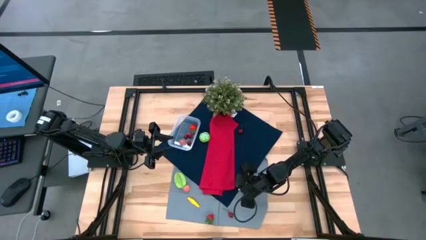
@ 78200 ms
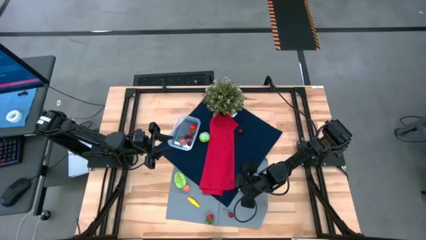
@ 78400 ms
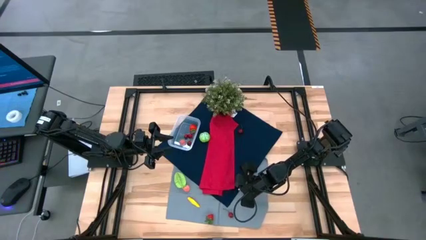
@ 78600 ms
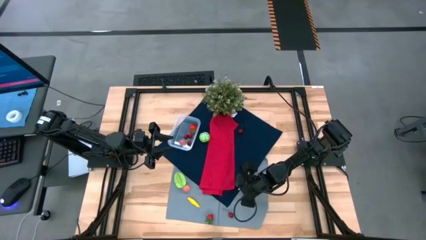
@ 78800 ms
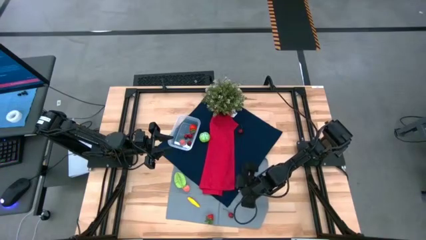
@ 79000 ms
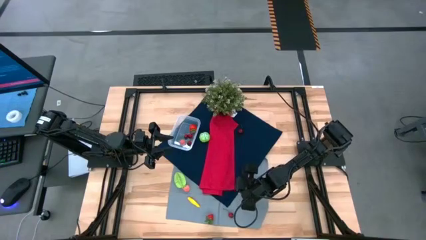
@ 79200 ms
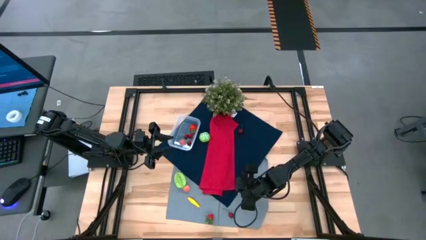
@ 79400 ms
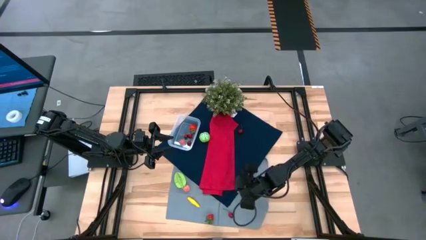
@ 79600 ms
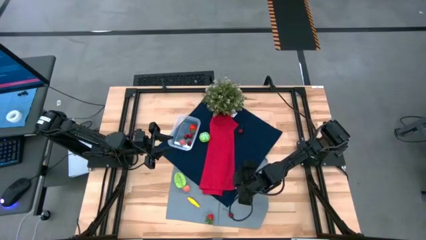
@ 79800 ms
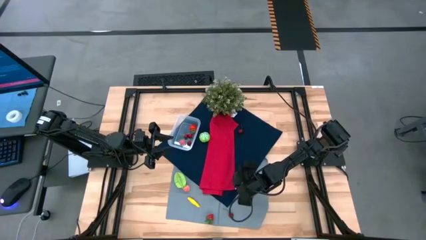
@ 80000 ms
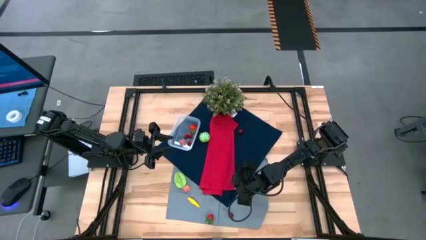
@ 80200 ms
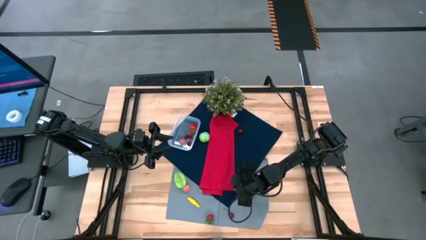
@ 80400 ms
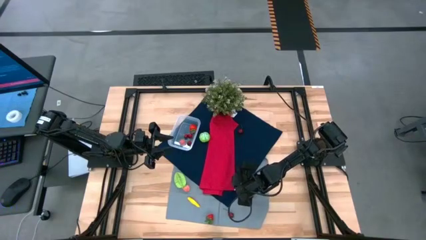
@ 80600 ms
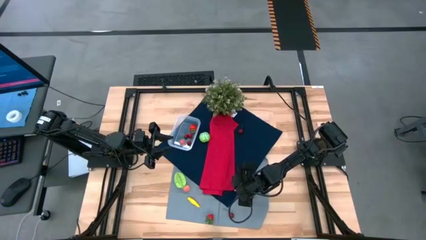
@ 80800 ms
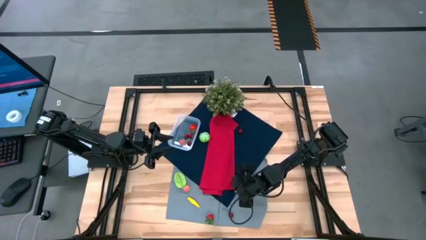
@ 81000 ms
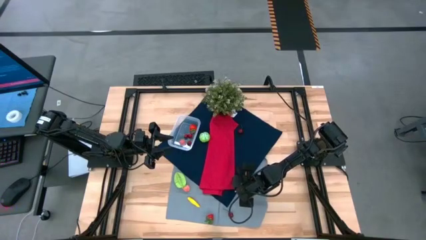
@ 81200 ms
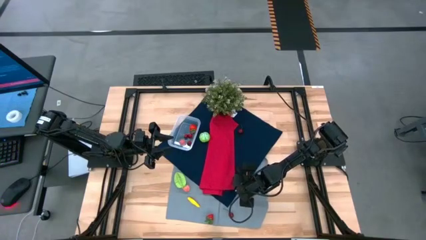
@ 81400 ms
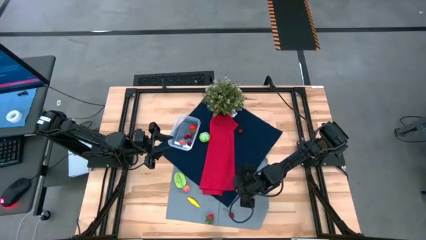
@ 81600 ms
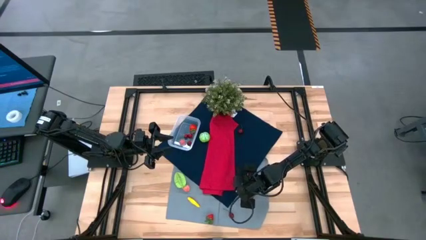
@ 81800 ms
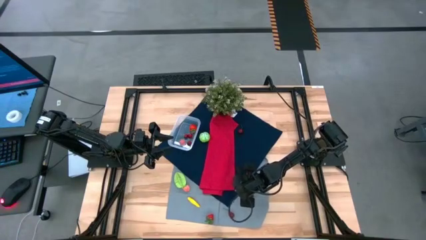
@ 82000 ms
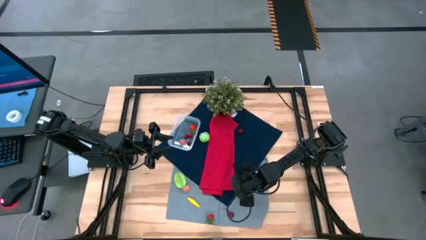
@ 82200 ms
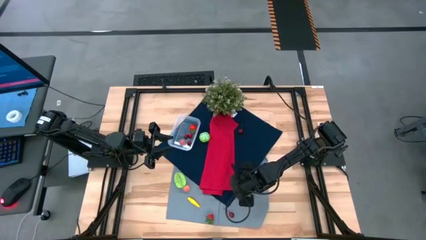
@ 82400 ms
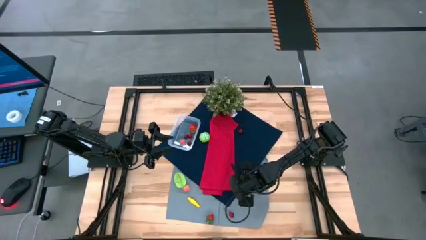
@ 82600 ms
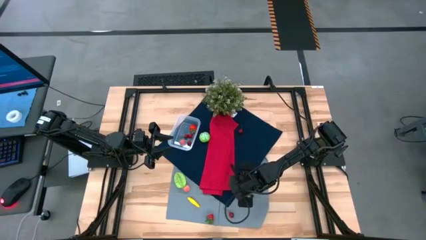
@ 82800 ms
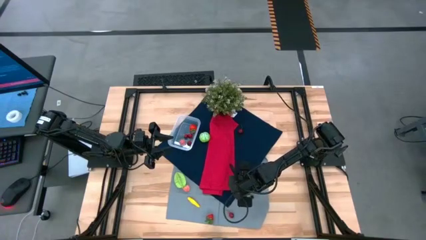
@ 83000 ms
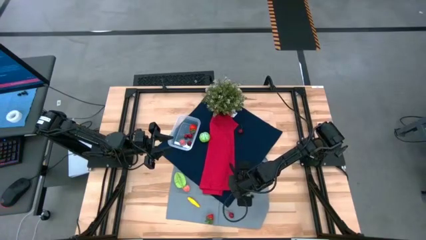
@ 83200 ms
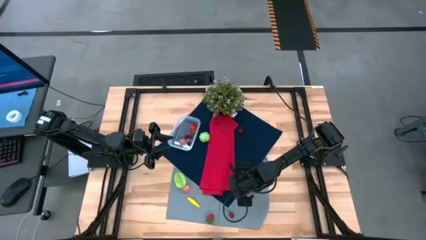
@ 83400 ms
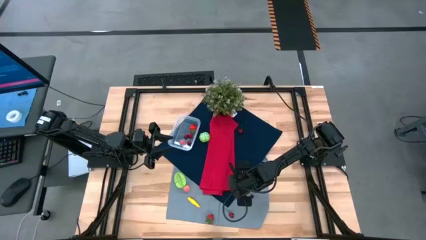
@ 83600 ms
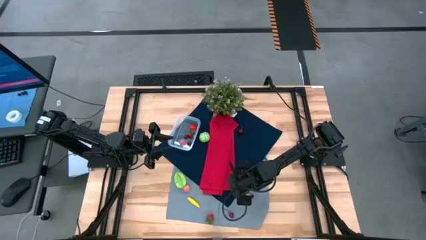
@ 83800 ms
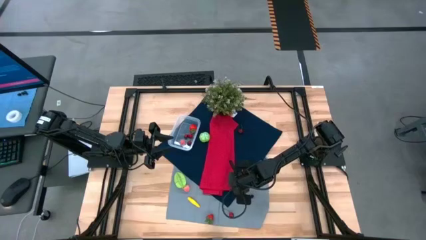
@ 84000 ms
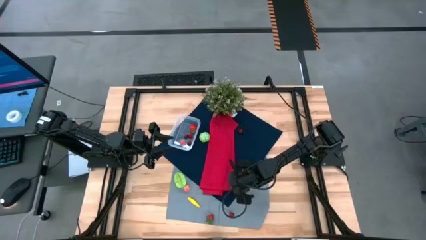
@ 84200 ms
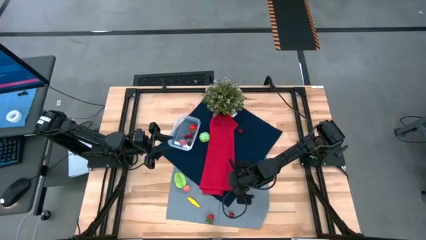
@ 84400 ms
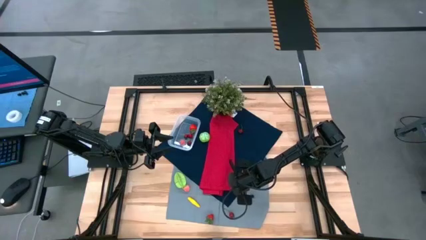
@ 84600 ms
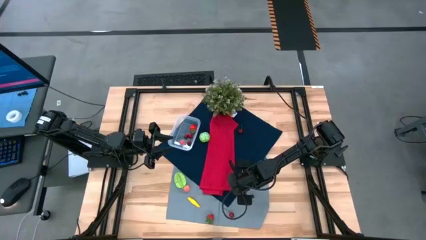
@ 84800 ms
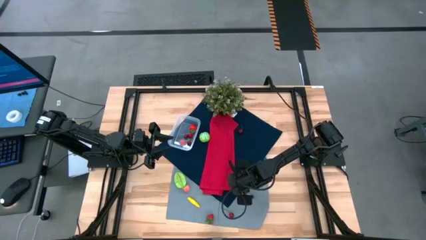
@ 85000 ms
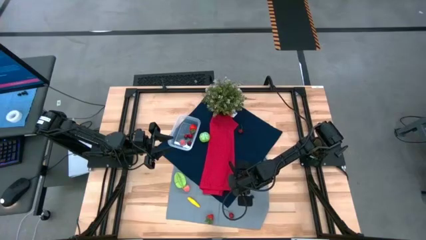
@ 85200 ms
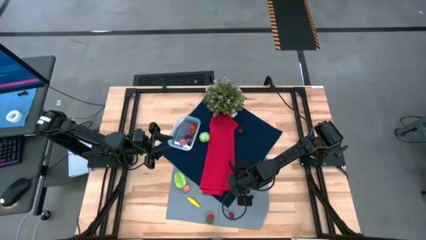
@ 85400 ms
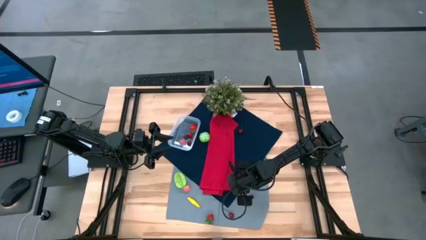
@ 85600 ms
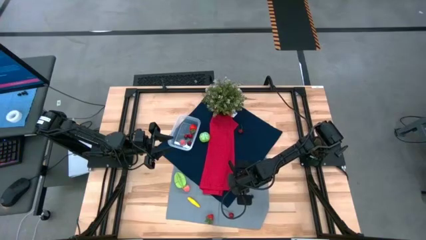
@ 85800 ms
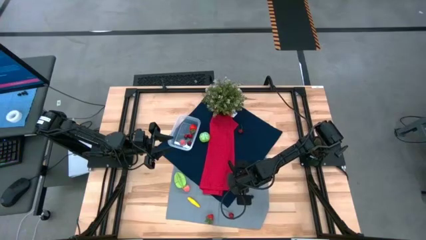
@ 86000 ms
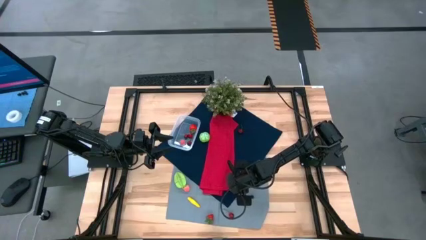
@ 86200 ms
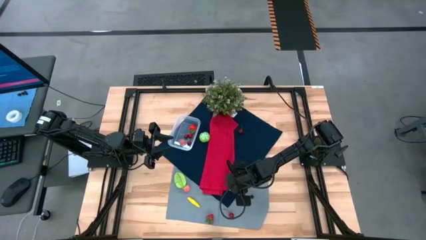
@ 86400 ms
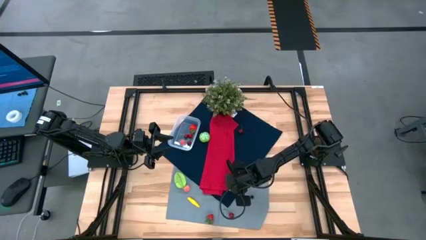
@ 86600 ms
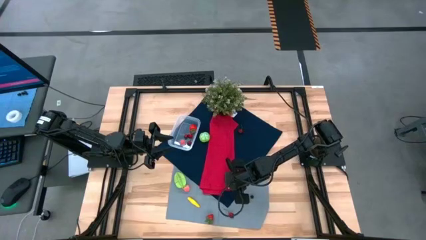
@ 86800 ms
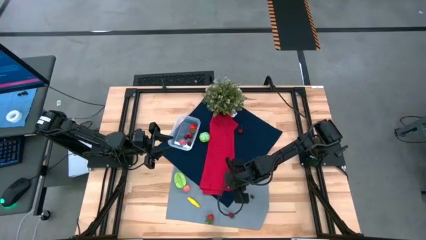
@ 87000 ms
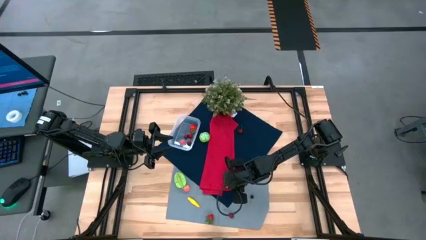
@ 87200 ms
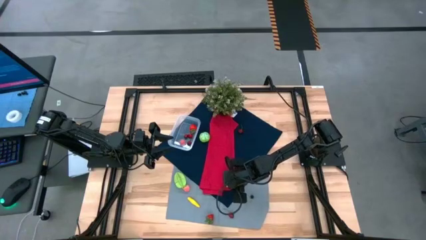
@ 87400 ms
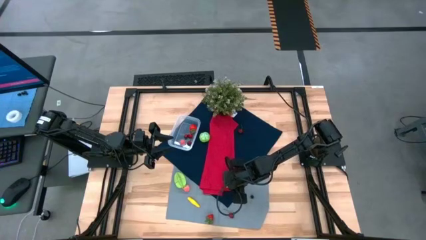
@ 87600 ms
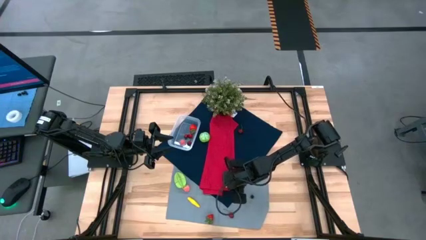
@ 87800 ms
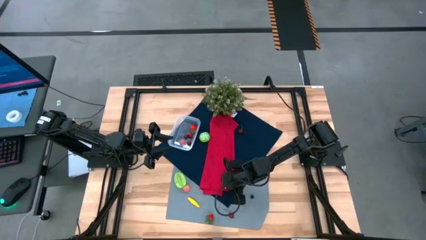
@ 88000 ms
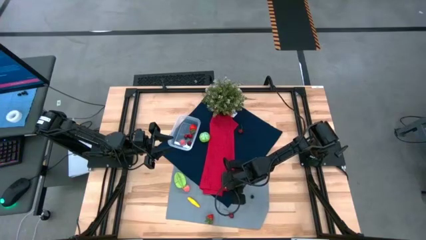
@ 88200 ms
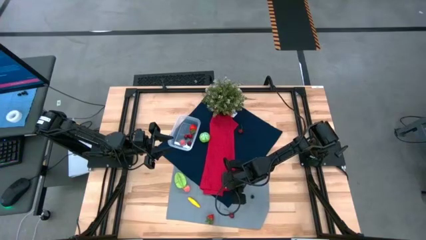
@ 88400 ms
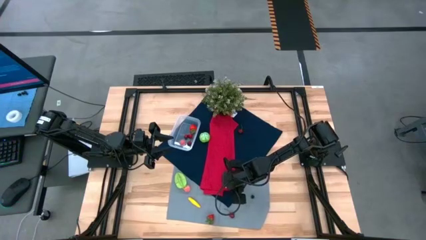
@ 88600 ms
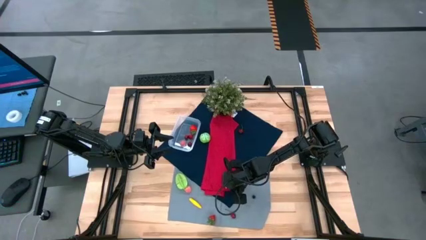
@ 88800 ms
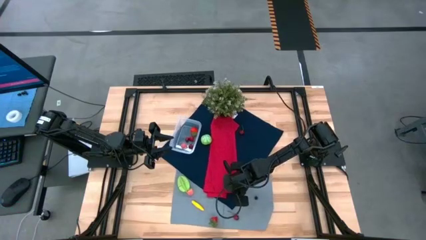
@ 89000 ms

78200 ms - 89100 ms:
Task: Pick and placing Produce into tupperware
Put the left blueberry into the transparent bin

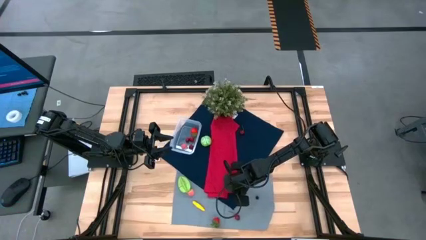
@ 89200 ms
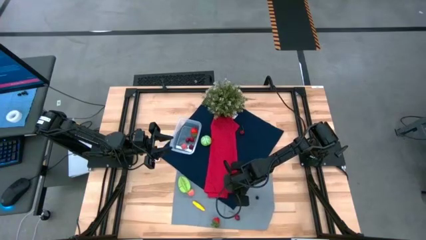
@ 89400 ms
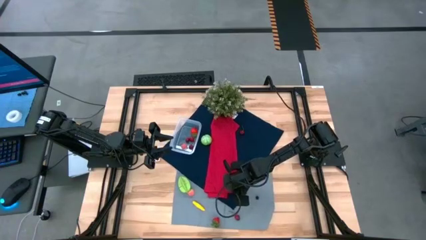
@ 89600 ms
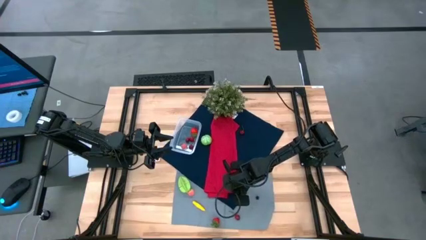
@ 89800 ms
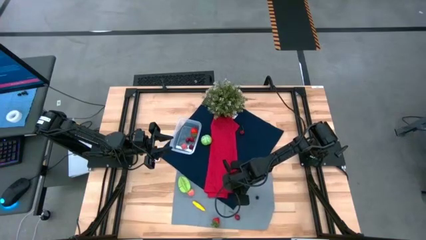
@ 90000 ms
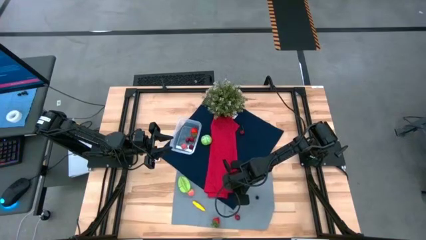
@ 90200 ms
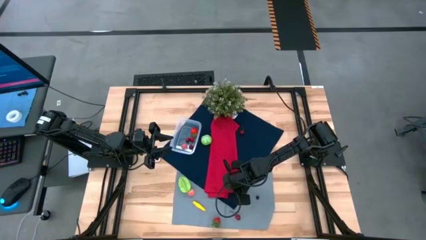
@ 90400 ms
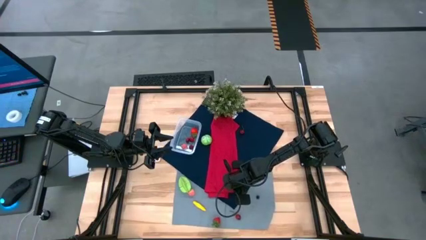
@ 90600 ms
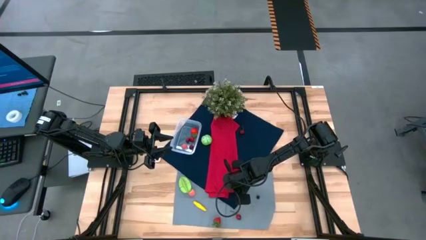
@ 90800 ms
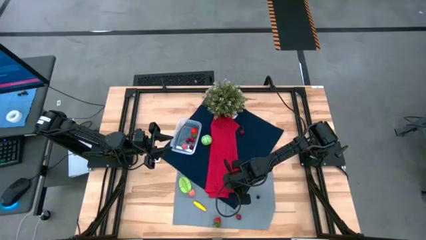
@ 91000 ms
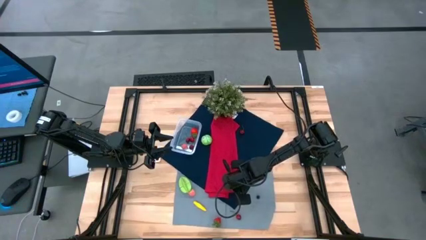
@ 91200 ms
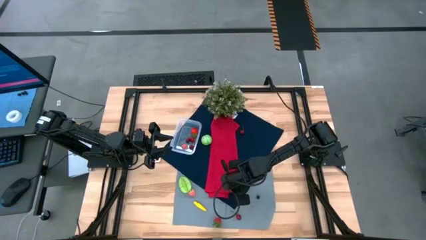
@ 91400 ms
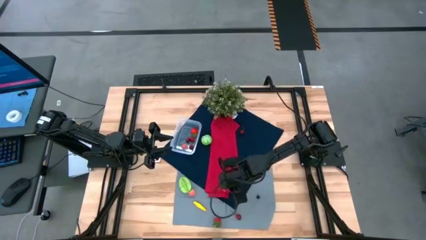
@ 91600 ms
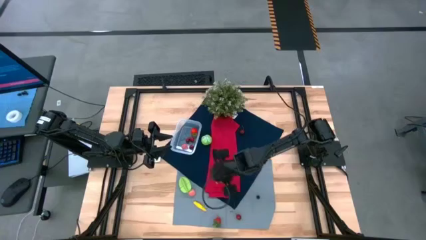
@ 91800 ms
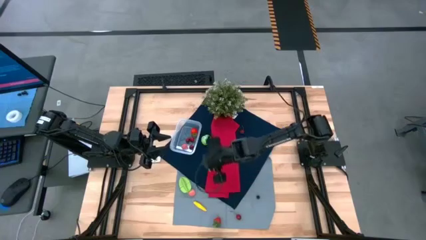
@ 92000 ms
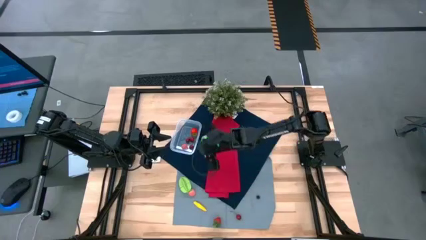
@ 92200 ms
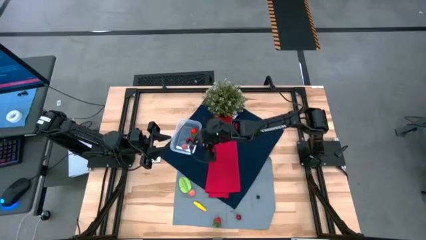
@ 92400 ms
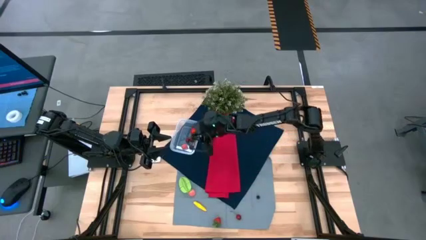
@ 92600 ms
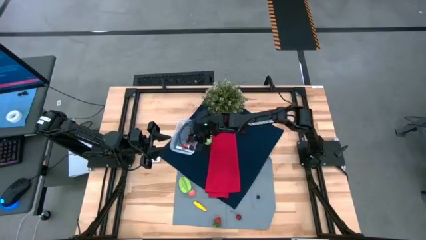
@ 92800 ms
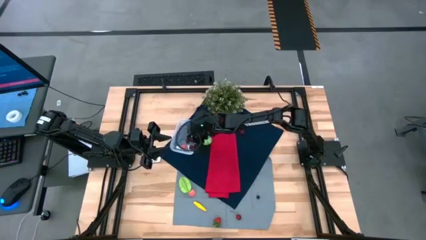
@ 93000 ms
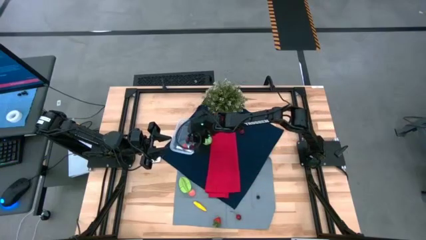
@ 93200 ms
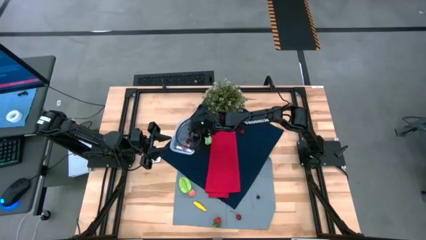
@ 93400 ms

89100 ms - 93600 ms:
Put the left blueberry into the transparent bin
